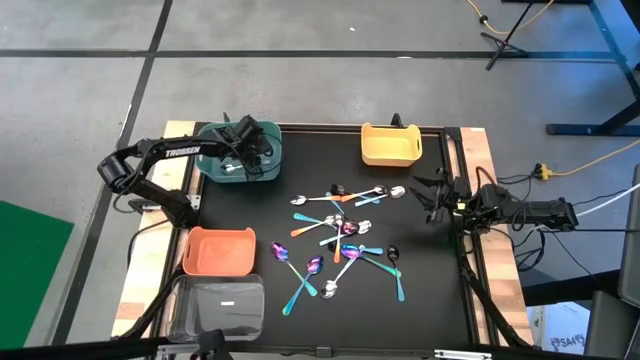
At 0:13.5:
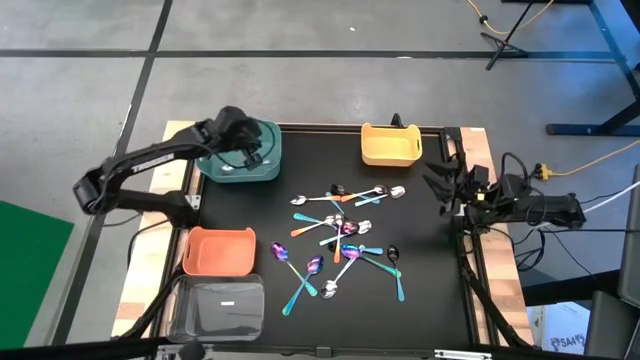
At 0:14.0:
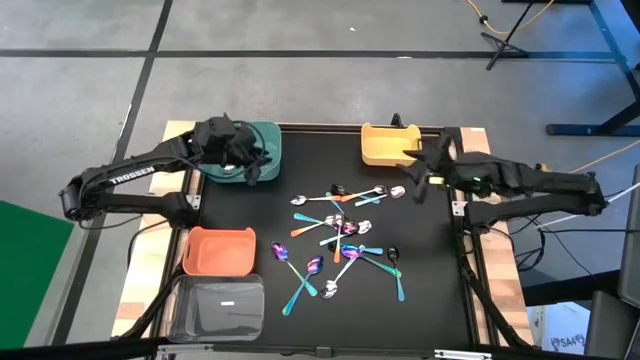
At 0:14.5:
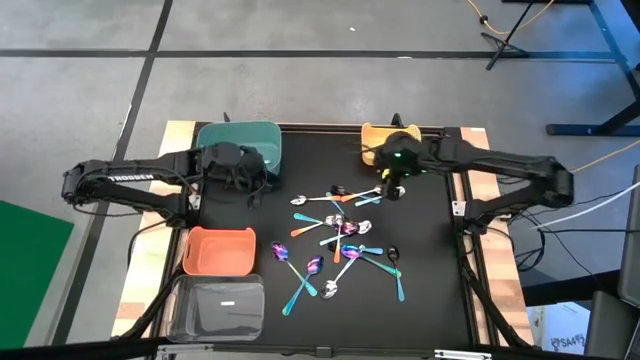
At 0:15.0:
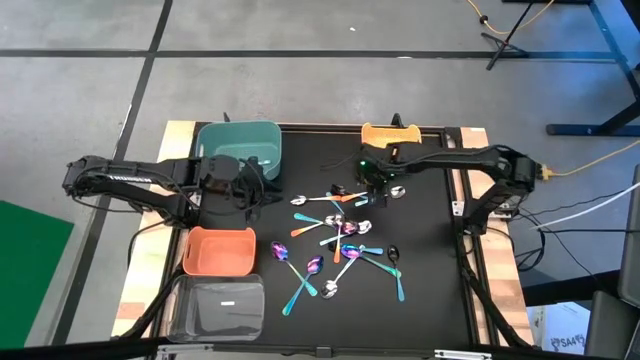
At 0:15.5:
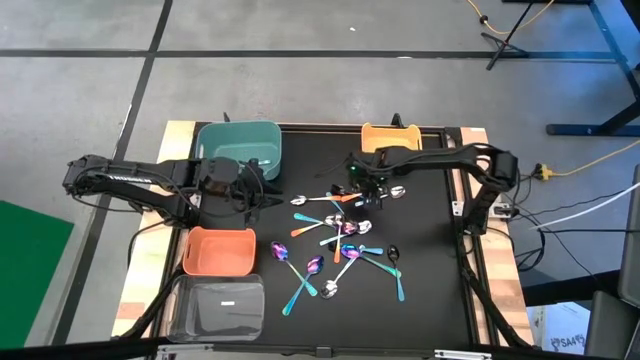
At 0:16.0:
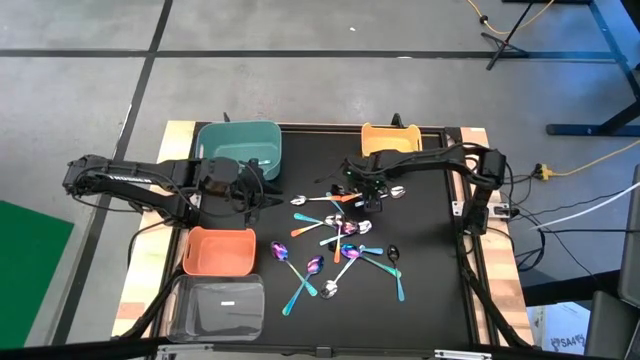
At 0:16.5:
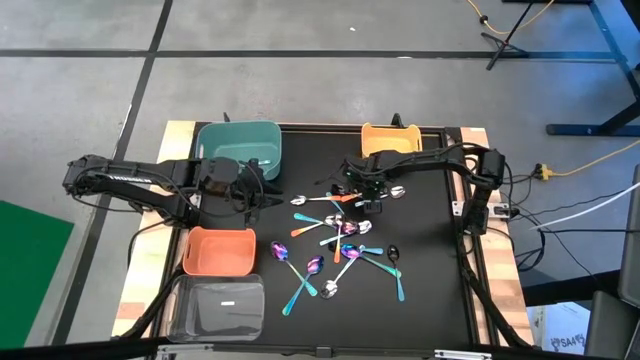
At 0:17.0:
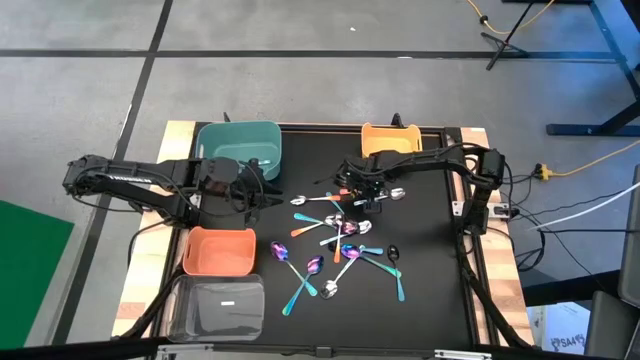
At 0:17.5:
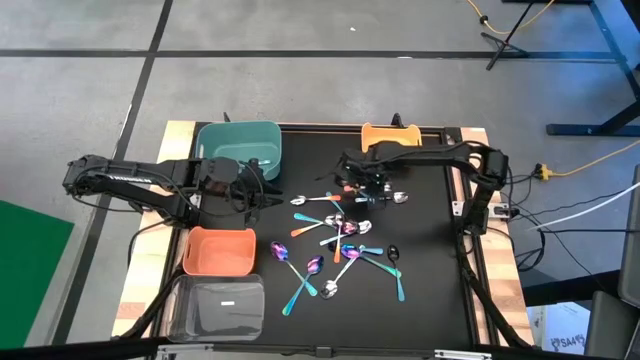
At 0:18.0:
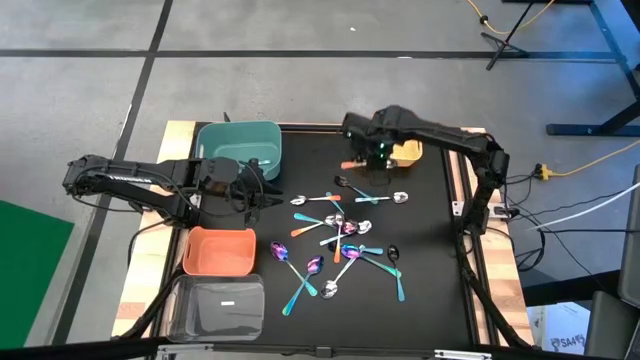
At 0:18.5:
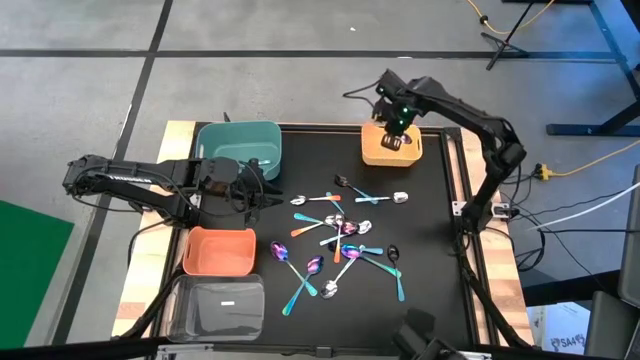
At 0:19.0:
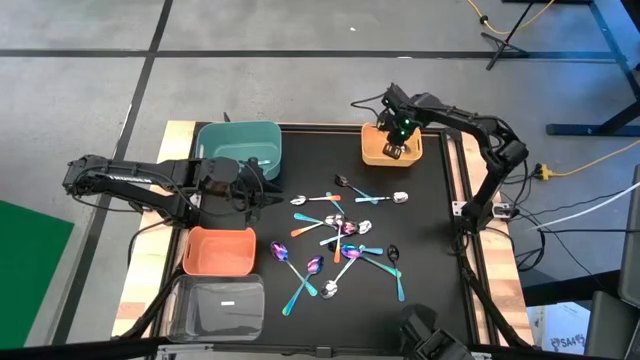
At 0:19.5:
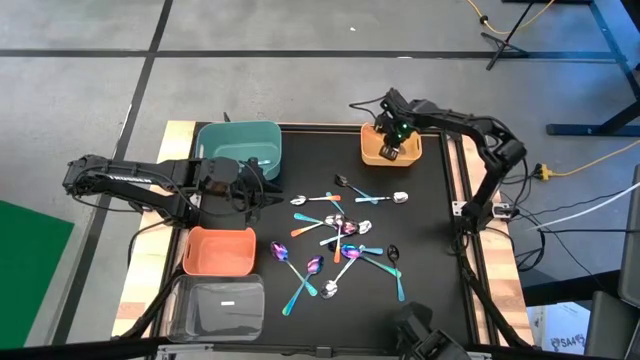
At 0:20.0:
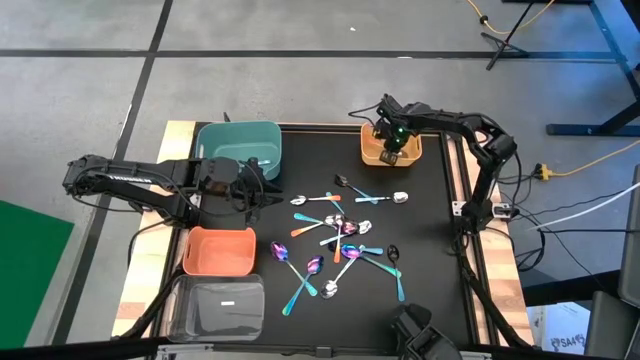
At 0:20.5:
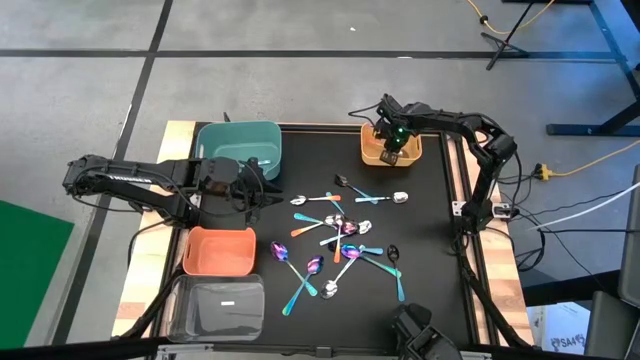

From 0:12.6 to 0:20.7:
Task: Sort silverware by color (type)
Put the orange spoon into the yellow bin

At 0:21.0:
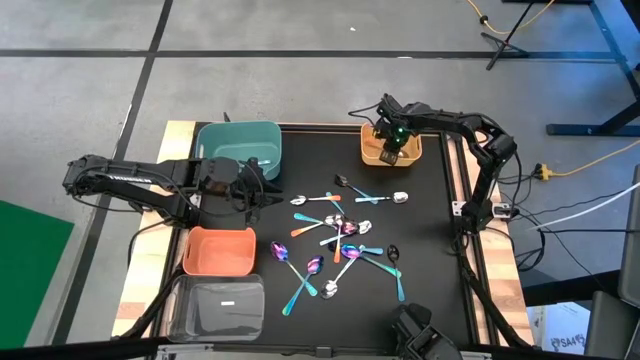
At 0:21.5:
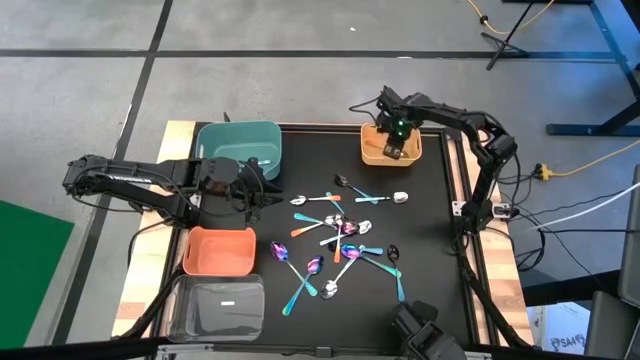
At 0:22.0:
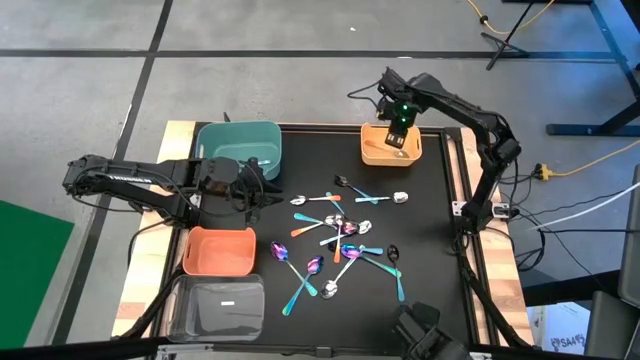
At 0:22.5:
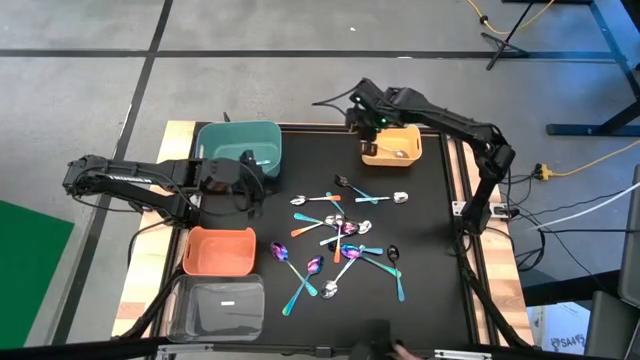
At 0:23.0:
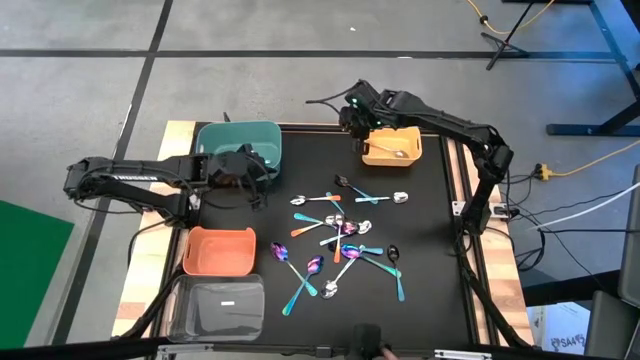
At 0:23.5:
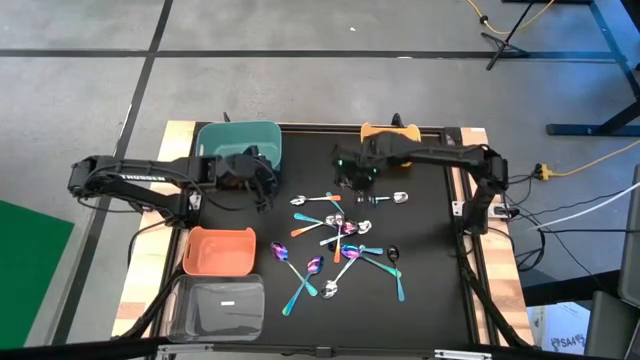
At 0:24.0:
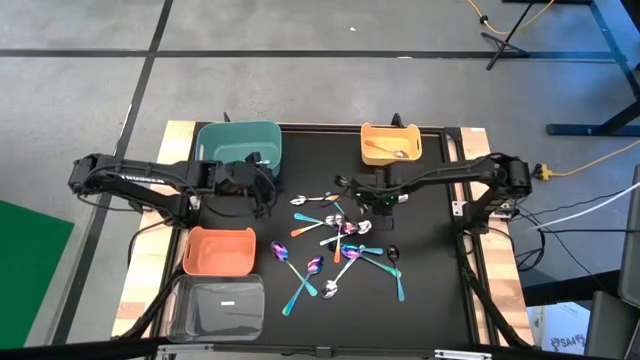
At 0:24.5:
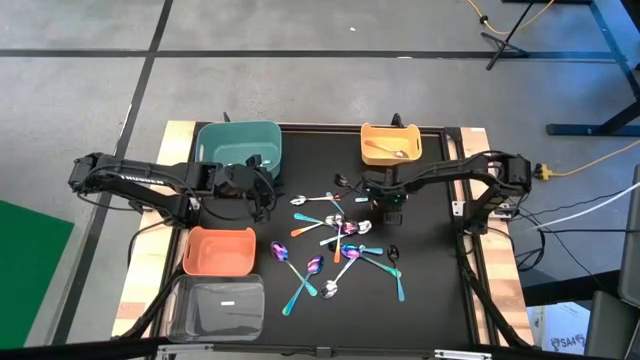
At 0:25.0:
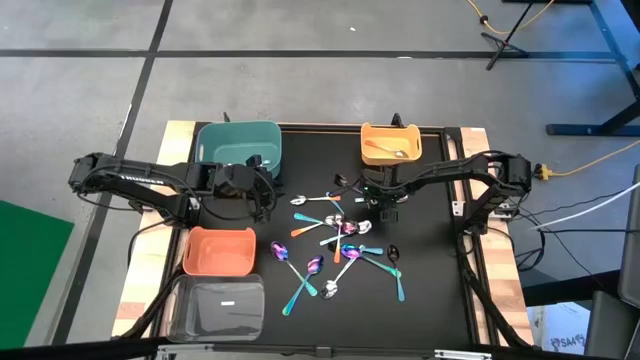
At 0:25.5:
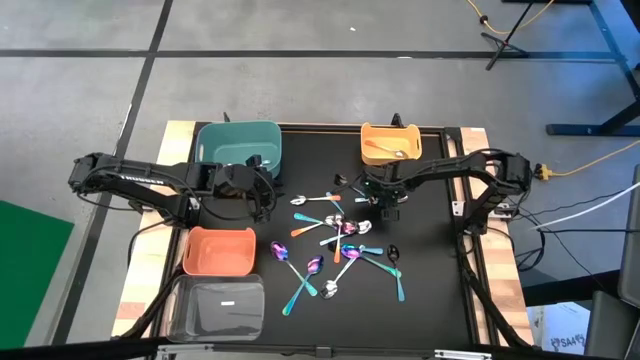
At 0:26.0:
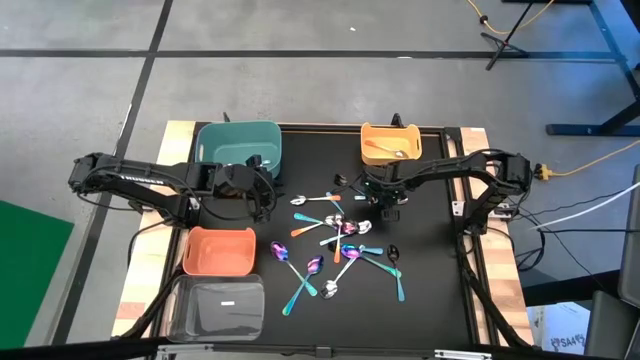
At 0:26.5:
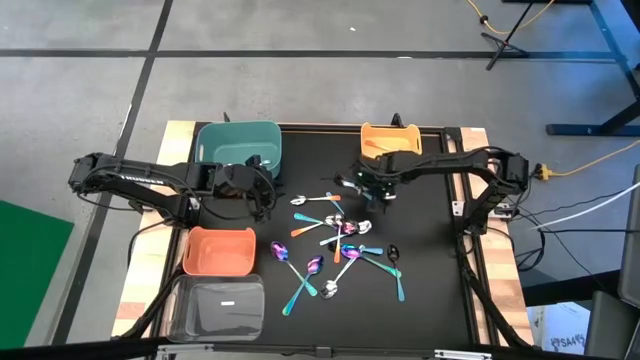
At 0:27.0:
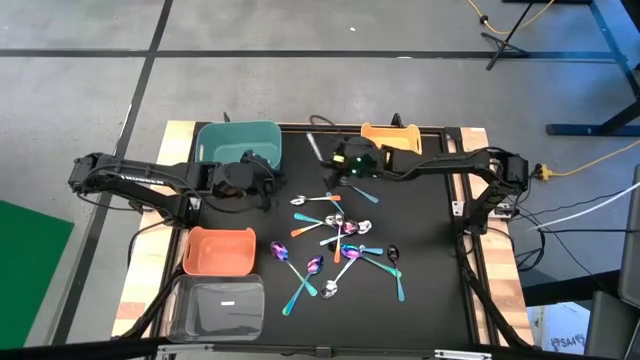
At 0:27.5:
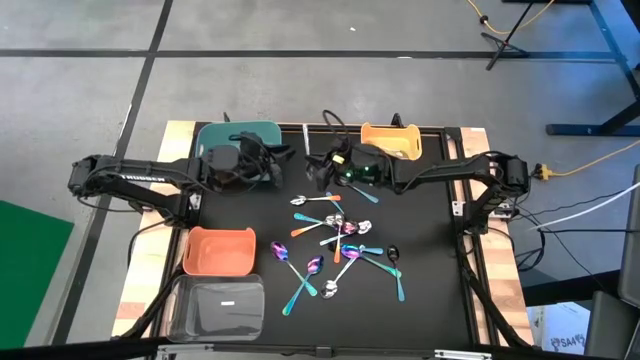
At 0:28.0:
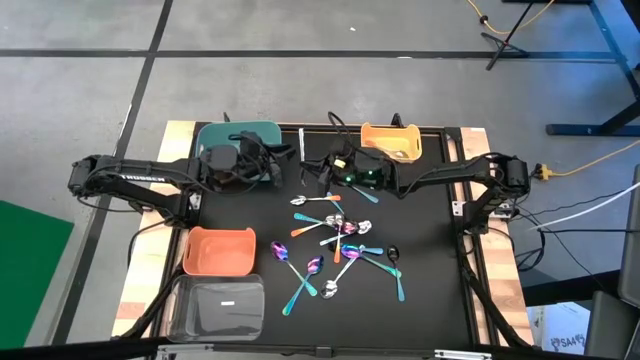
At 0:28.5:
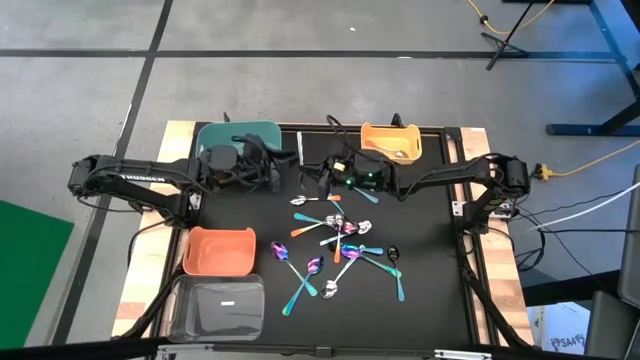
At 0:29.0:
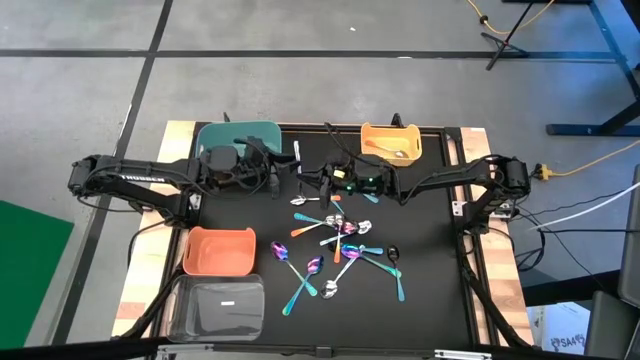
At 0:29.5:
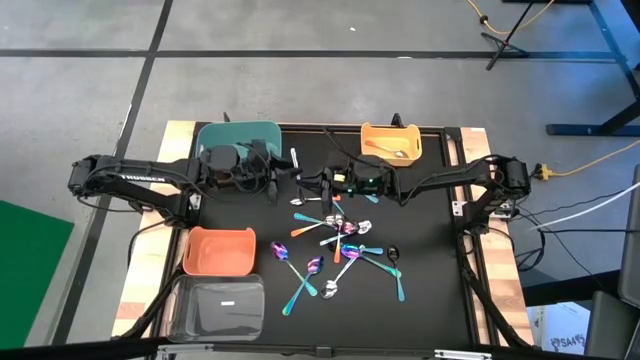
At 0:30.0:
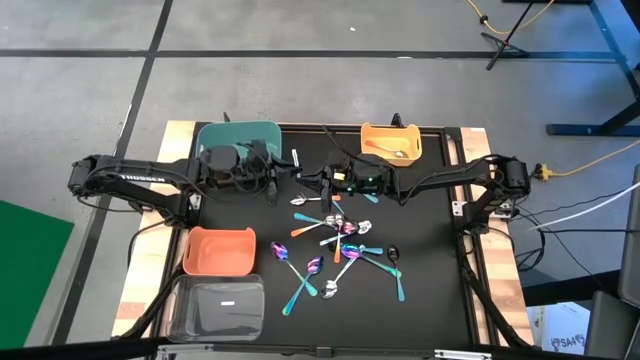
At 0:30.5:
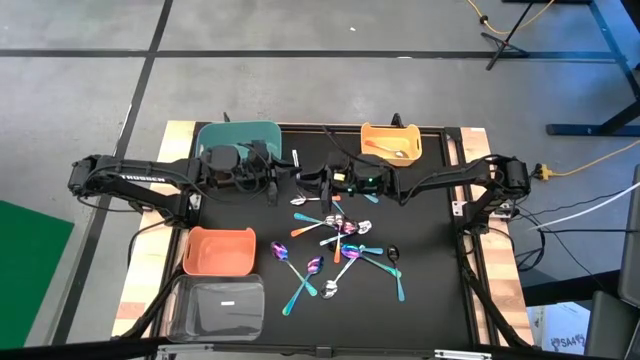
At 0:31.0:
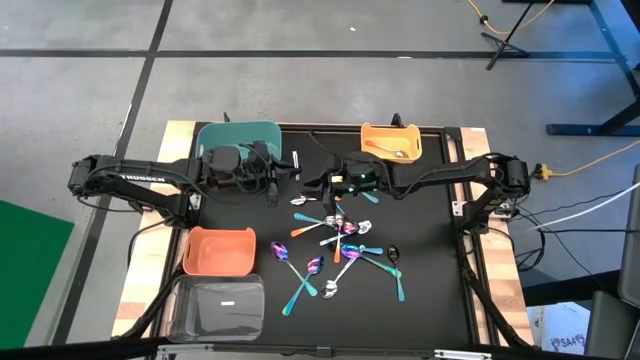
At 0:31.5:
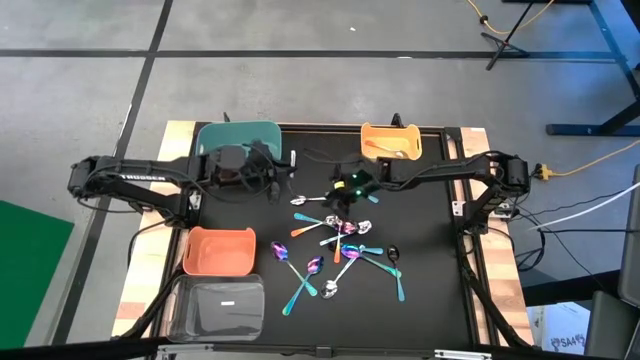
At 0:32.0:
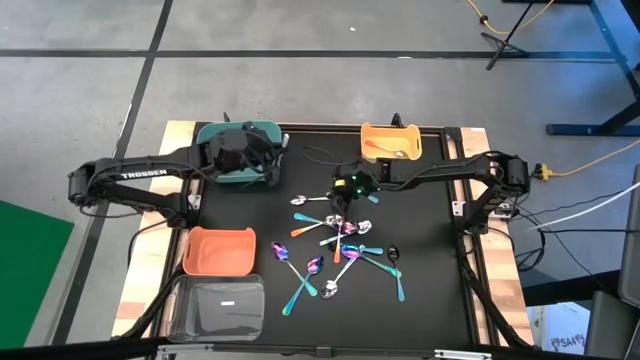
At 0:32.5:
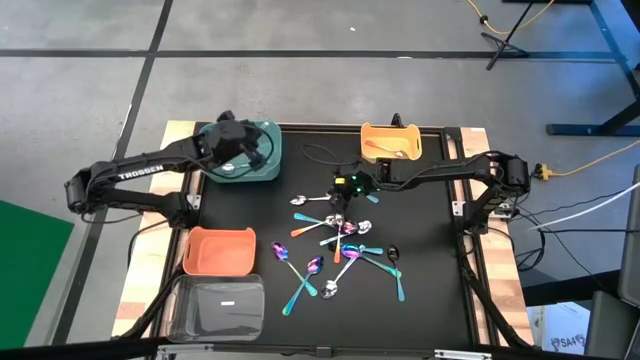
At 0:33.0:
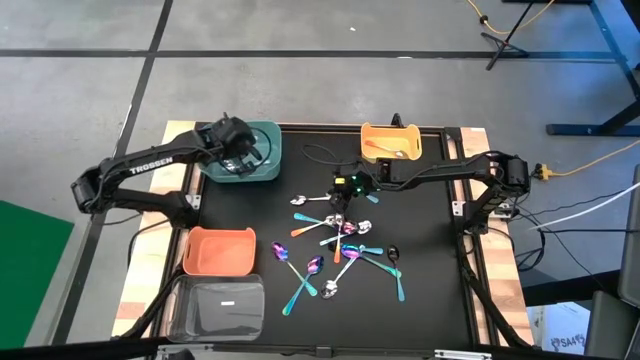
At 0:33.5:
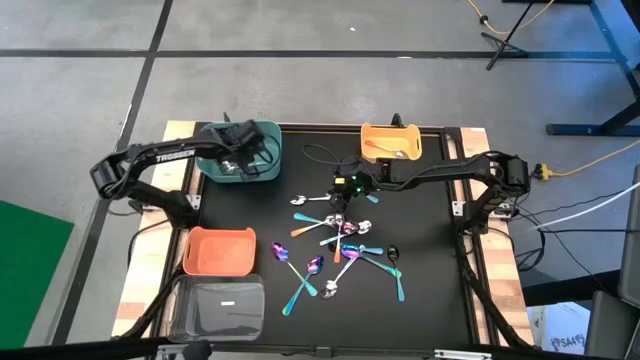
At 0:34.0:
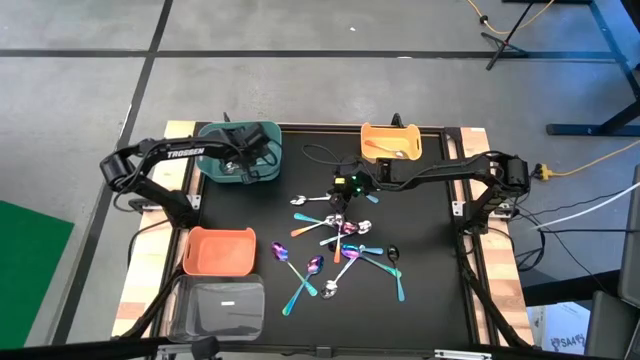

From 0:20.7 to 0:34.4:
Put the blue spoon into the blue bin
